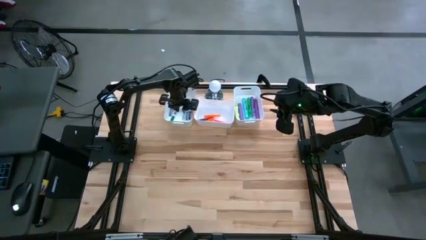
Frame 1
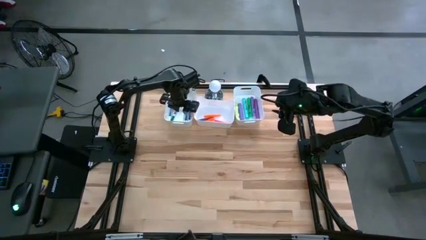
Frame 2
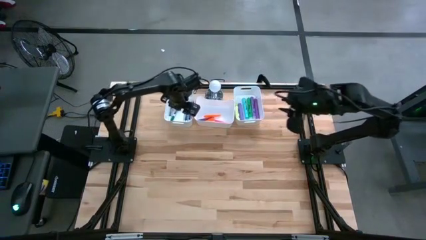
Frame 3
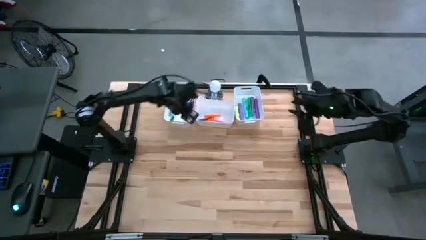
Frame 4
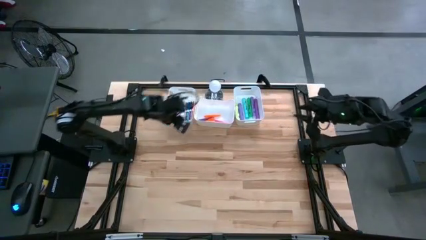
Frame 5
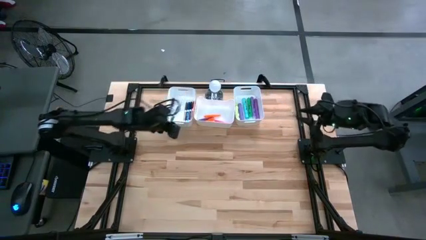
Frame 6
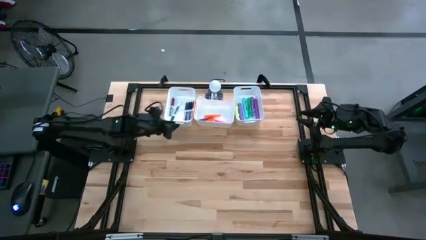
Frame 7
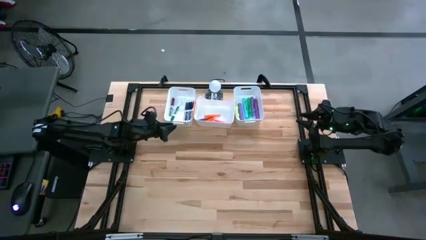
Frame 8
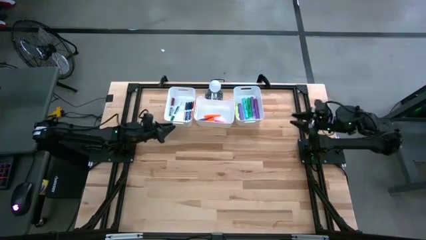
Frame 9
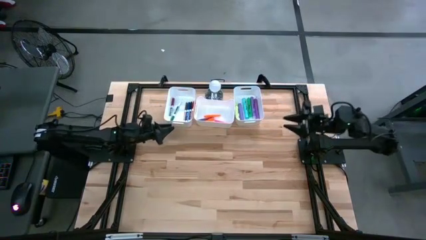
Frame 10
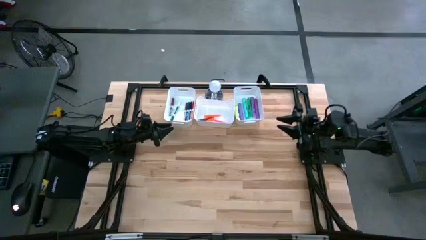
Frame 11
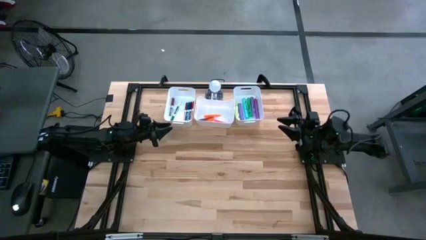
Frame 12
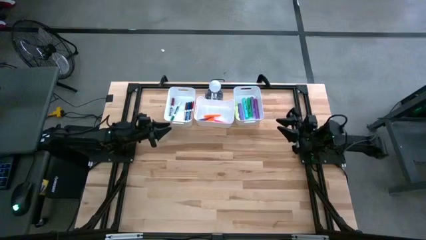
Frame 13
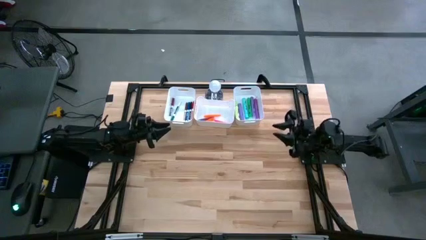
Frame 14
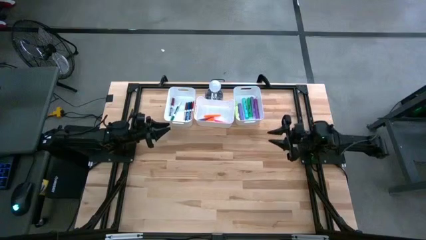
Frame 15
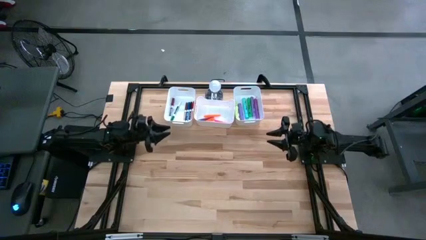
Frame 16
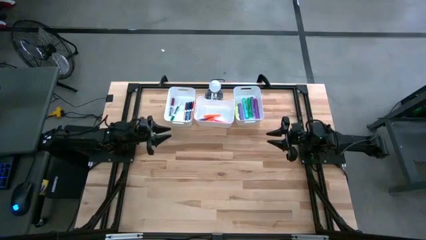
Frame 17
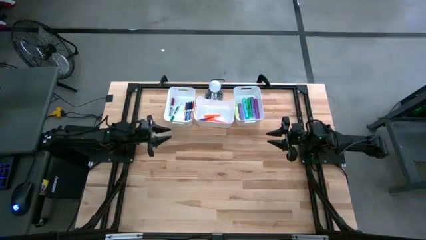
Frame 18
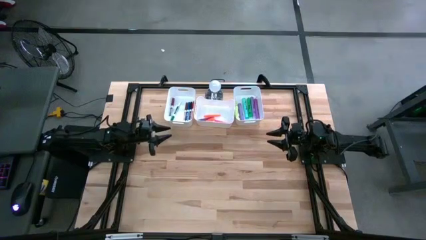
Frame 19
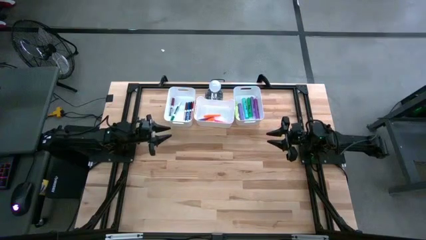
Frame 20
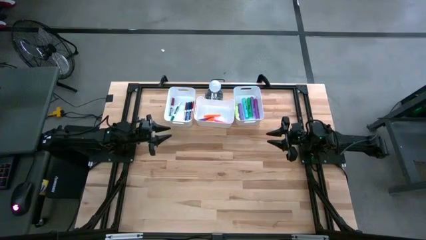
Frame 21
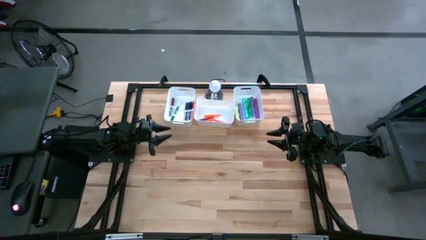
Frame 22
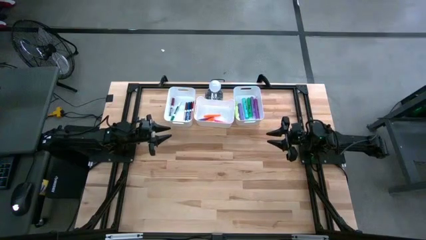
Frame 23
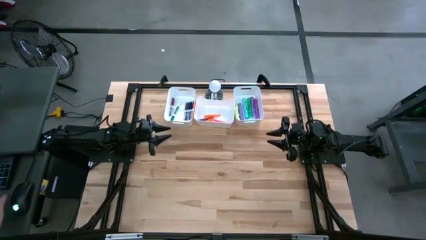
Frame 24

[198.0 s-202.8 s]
Task: Pick & Place Markers
Return to Home Position
